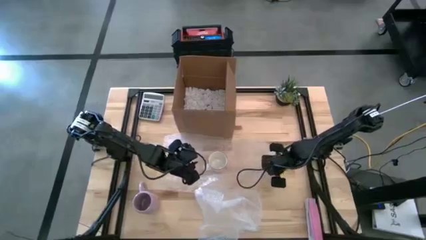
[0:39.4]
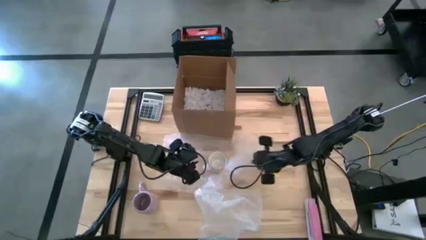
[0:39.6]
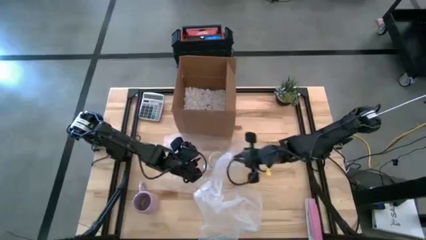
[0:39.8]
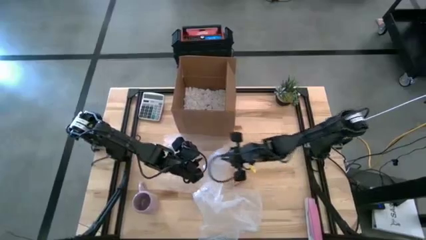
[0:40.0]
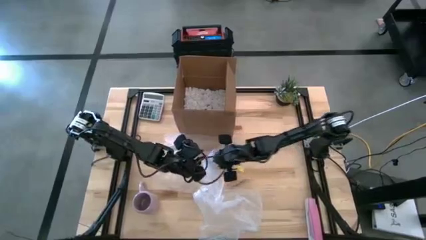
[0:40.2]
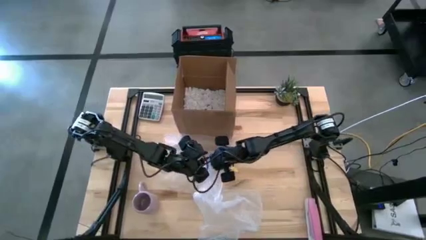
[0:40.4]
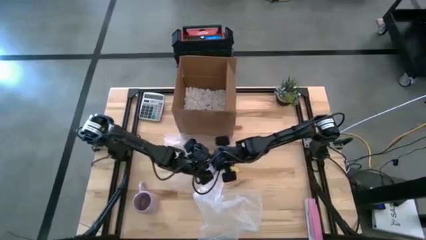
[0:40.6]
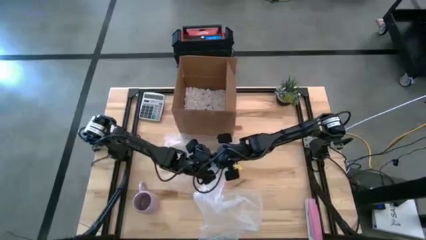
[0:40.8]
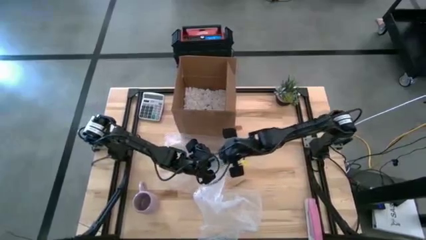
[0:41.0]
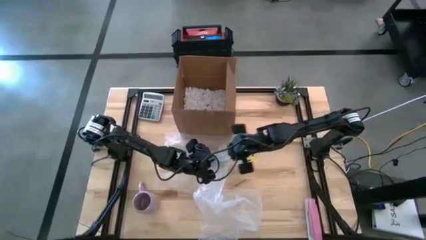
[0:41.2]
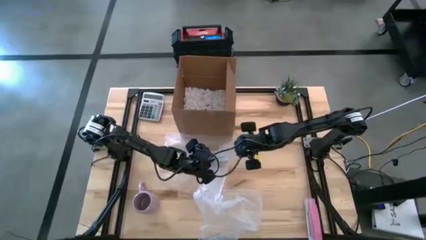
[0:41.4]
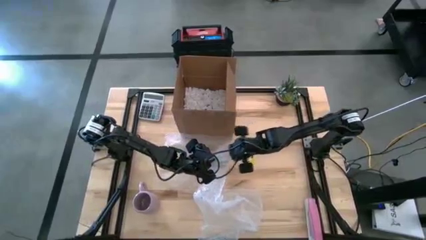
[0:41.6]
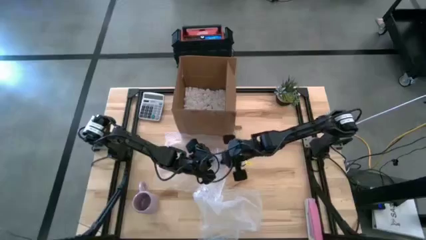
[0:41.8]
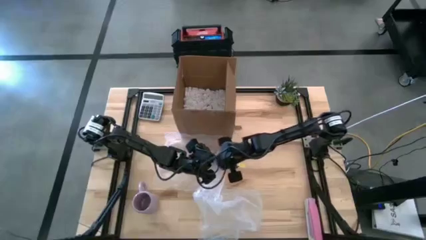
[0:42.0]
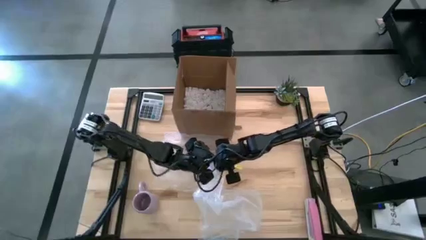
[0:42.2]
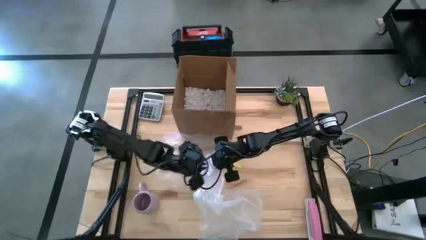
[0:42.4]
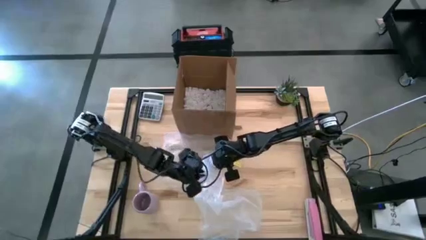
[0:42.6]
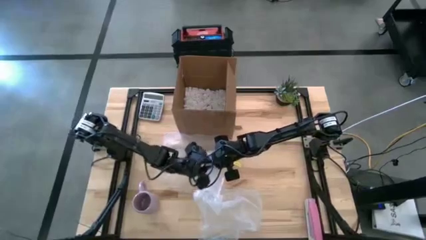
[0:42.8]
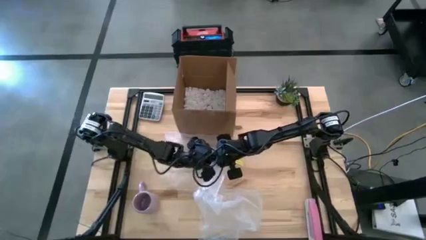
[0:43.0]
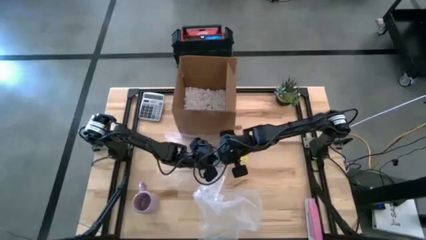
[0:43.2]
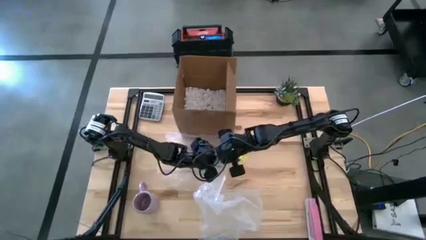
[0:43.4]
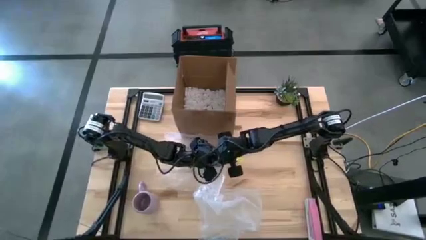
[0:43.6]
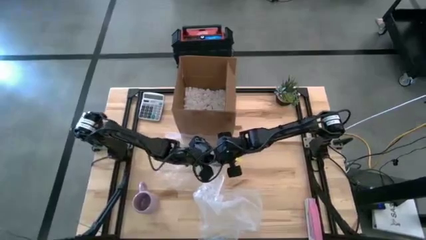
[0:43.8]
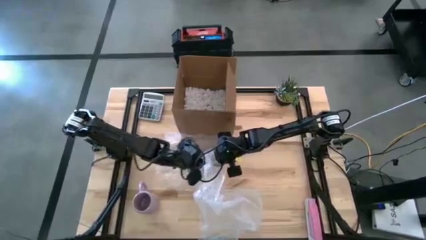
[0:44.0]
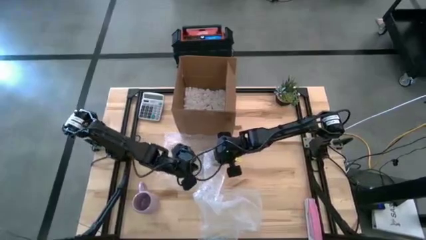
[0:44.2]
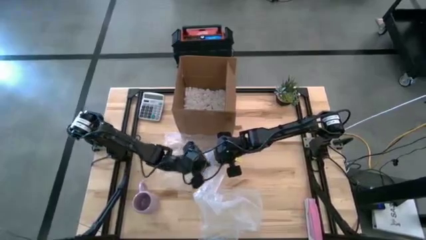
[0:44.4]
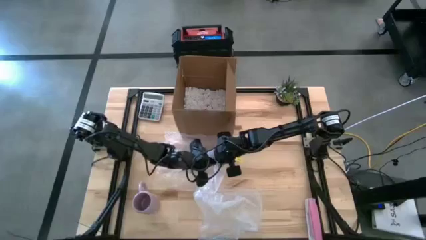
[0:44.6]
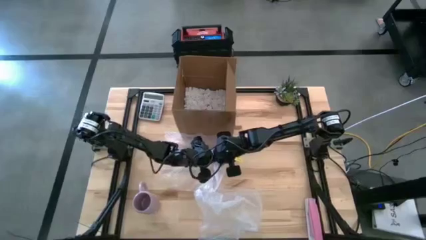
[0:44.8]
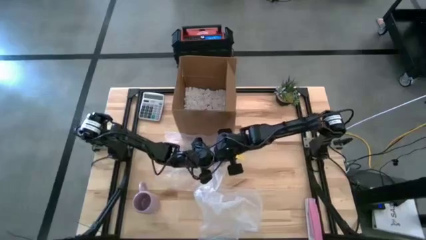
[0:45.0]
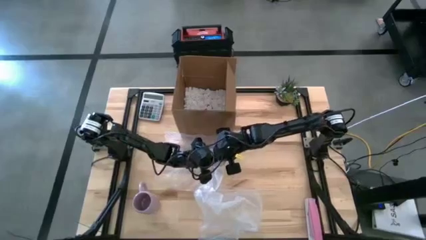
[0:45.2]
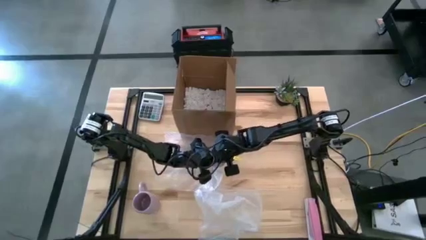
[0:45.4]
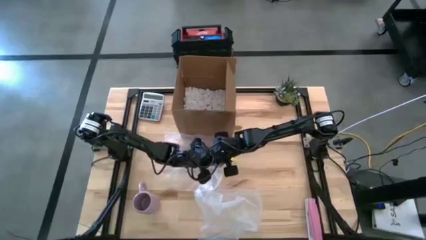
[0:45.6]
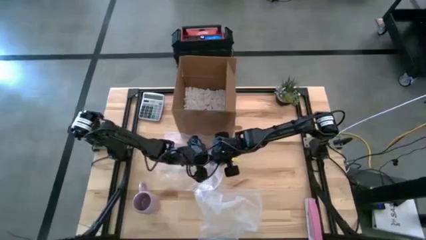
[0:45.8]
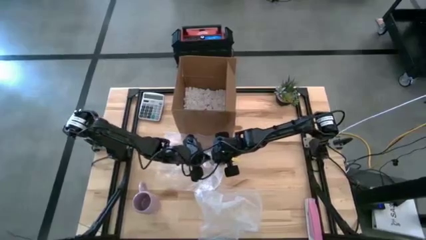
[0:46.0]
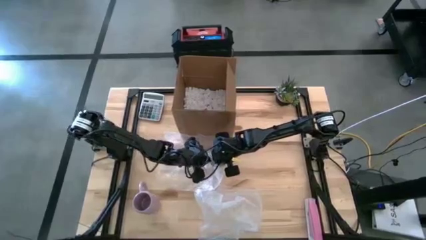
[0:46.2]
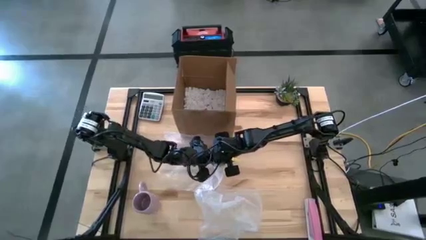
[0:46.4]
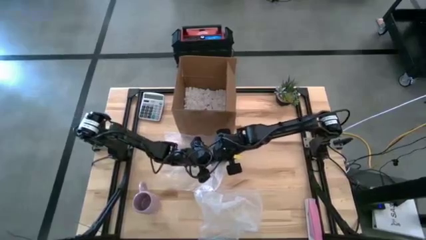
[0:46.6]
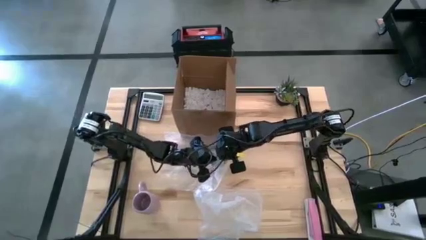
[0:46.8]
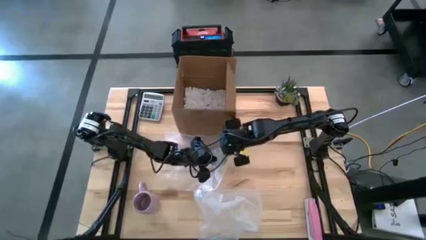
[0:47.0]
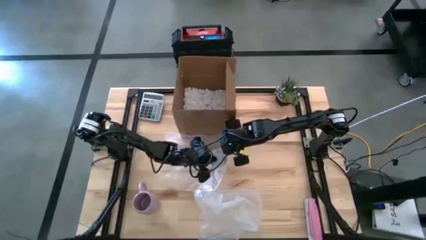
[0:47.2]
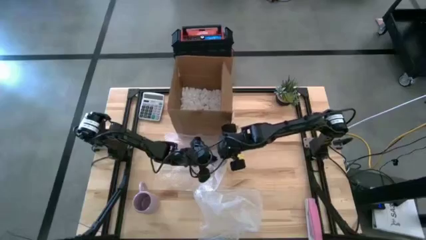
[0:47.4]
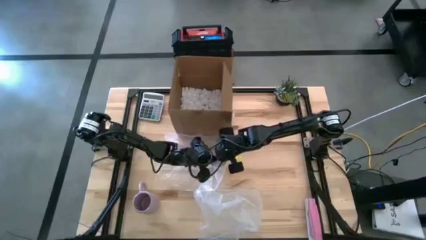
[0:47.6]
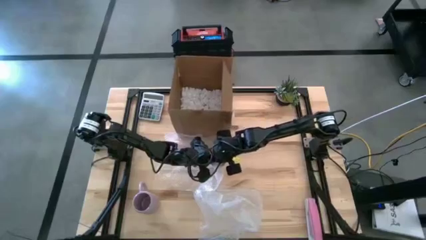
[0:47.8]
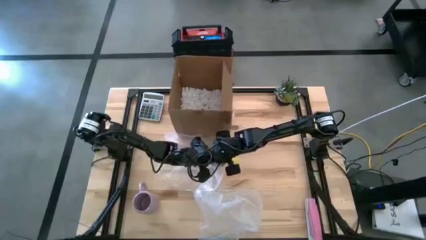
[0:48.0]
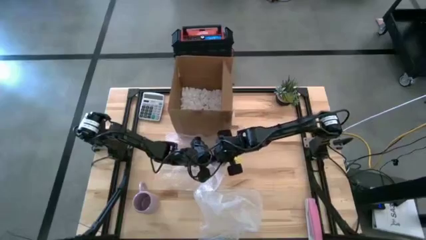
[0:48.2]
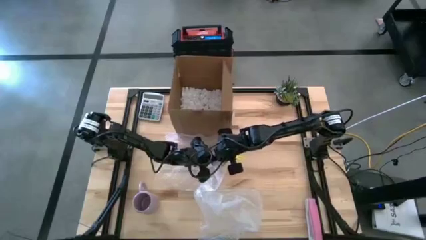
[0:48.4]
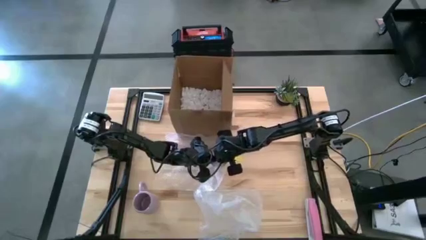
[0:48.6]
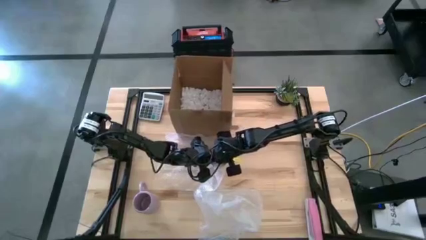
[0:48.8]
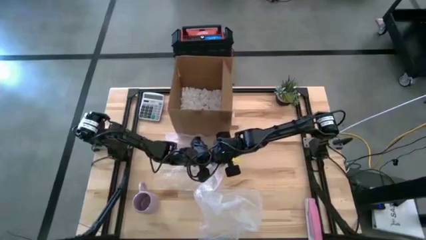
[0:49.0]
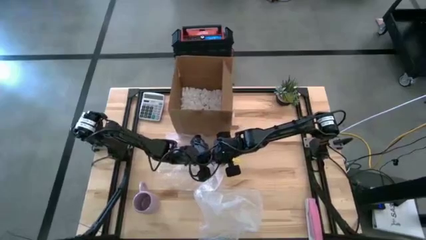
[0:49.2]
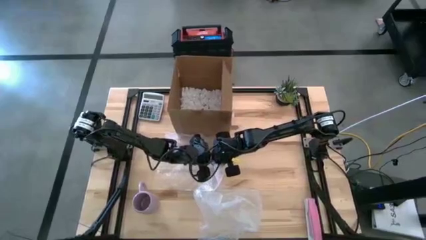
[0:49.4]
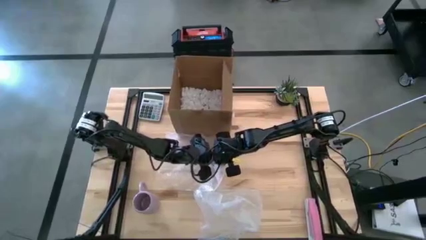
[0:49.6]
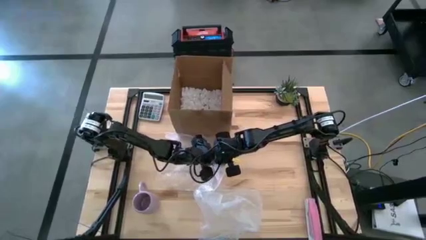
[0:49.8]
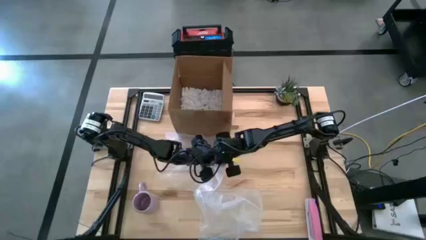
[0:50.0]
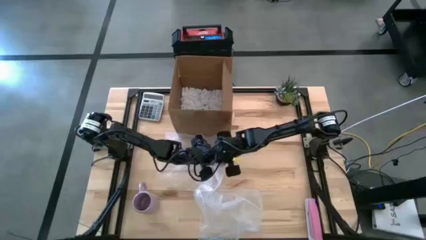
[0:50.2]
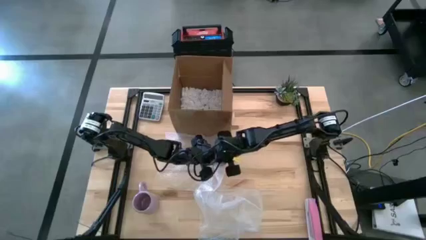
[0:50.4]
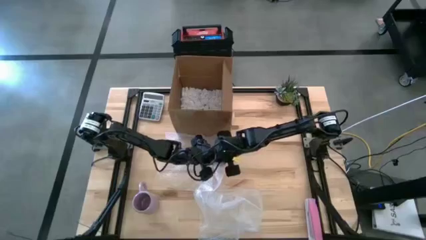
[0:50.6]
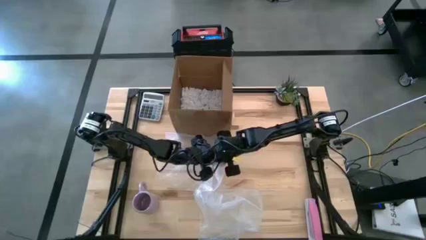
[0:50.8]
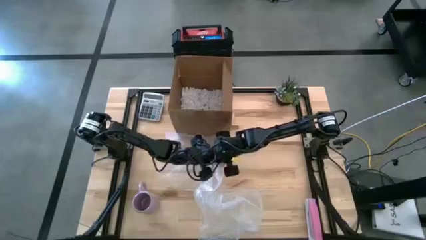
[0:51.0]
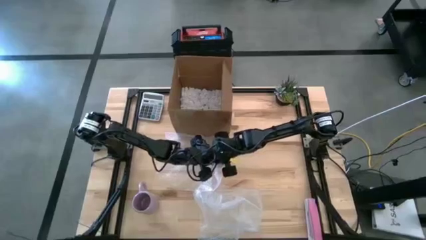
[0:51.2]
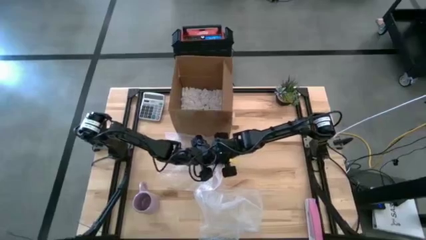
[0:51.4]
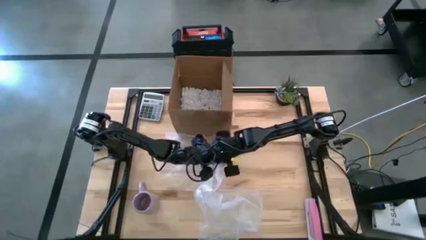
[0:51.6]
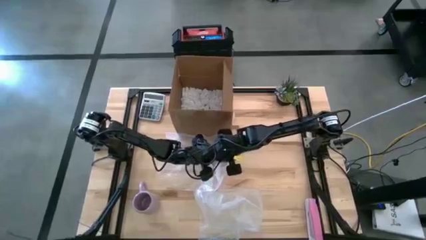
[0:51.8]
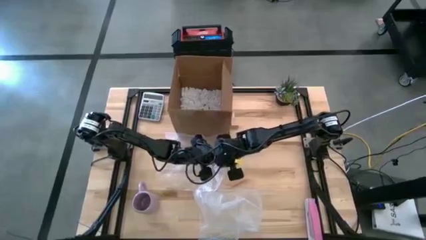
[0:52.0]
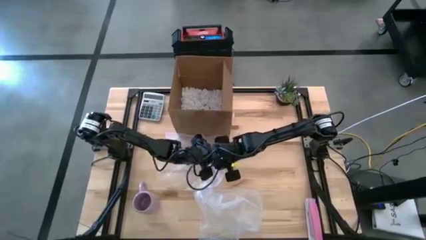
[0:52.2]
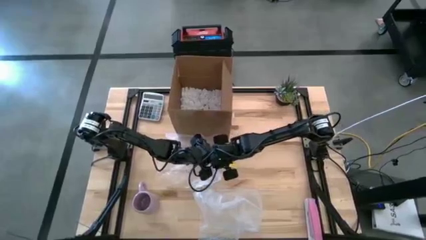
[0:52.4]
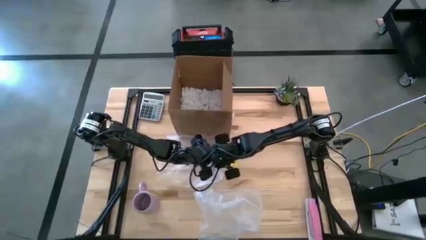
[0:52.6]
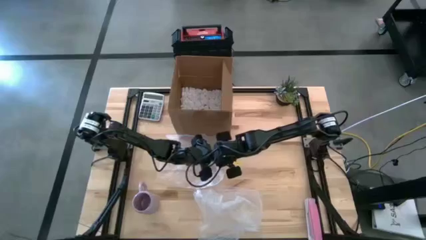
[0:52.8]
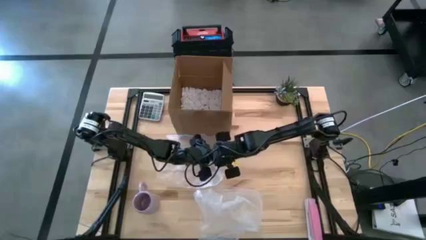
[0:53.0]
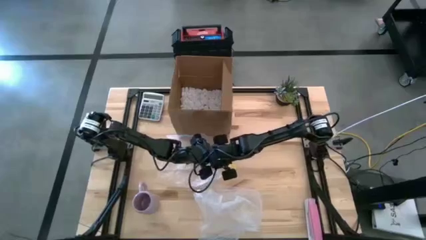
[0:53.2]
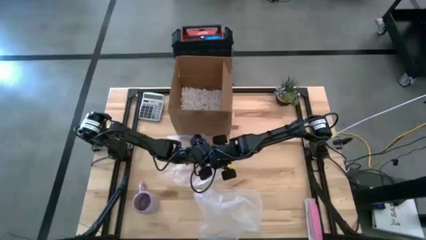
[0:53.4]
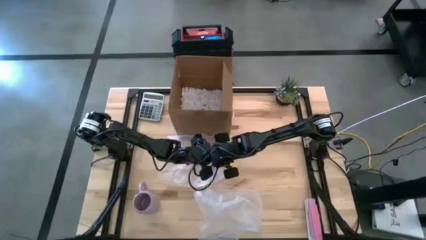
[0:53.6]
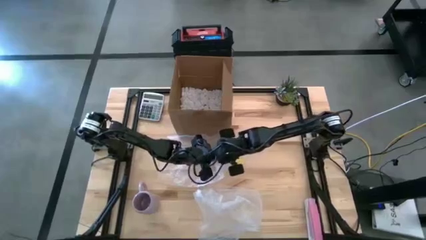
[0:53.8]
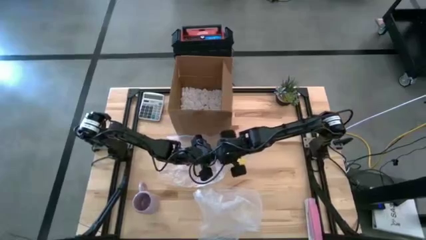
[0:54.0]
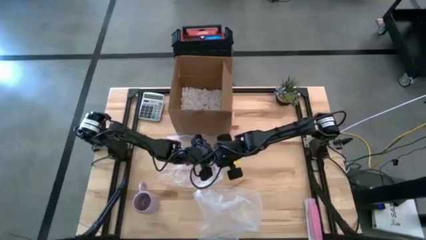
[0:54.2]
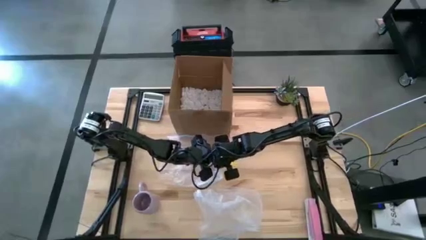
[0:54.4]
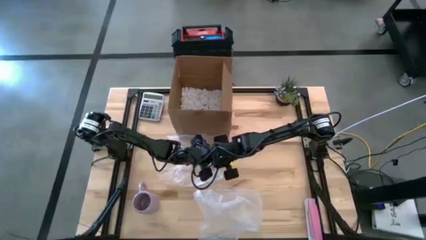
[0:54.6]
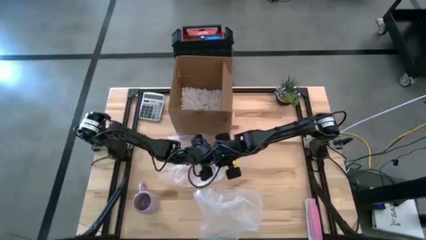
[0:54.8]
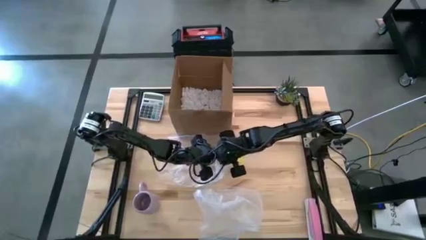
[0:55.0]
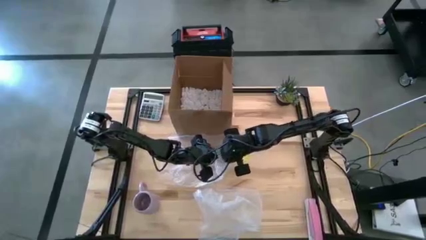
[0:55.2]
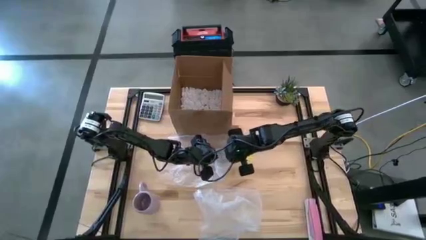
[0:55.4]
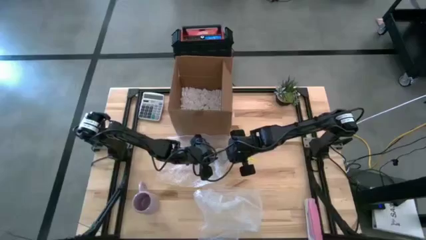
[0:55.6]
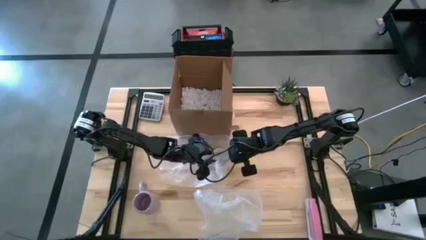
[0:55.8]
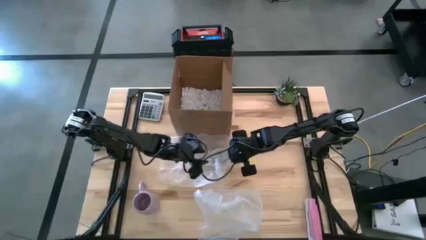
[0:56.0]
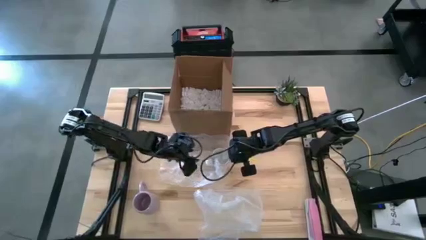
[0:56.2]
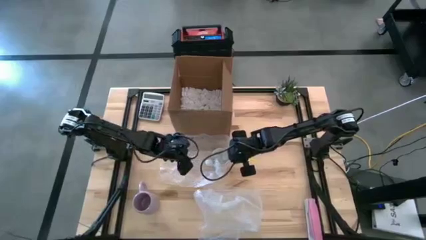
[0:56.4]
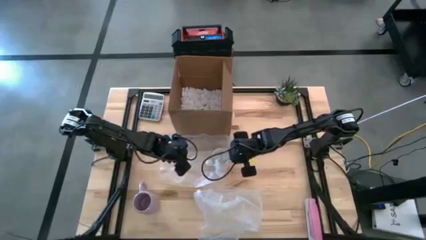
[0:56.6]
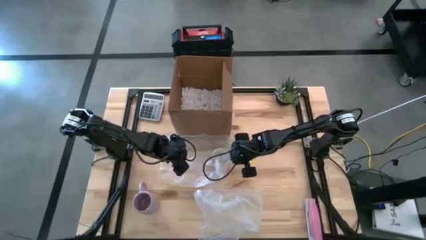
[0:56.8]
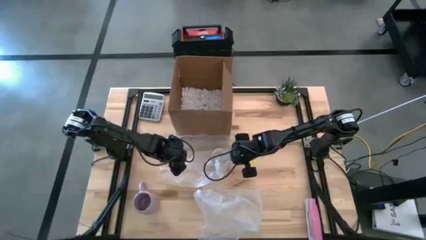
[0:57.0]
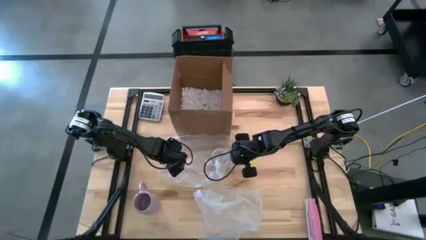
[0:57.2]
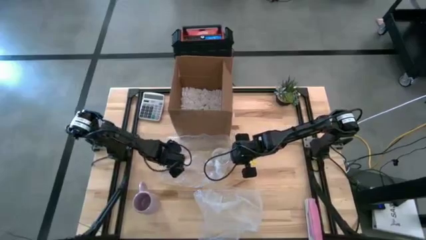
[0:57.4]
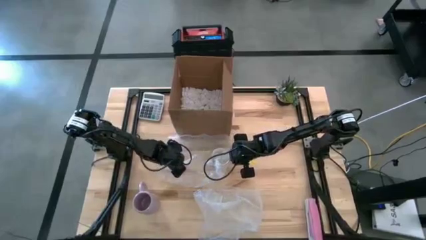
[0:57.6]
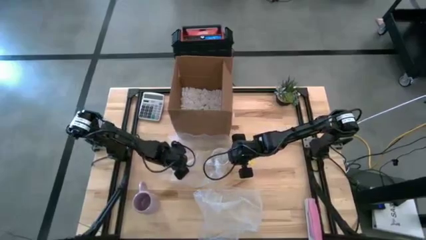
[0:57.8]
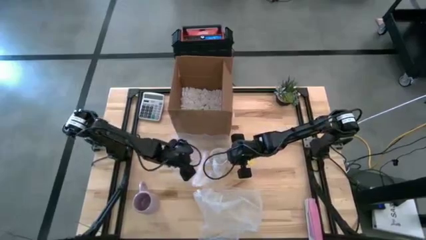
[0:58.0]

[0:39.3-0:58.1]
Task: wrap mug
Wrap the white mug with the bubble wrap
